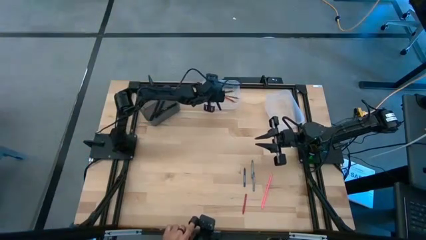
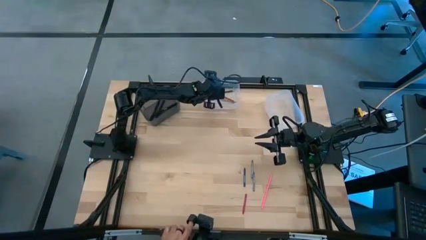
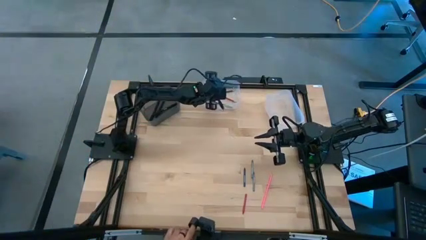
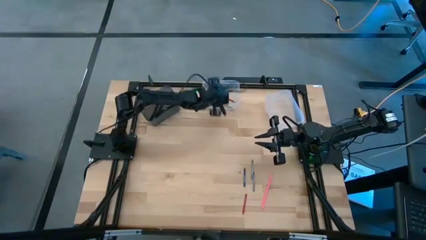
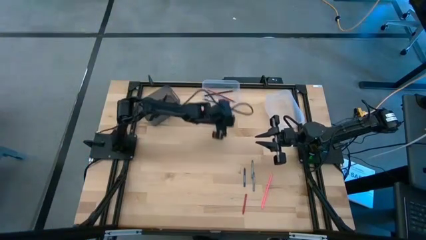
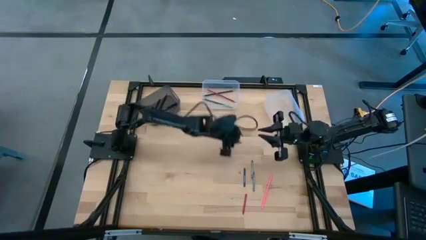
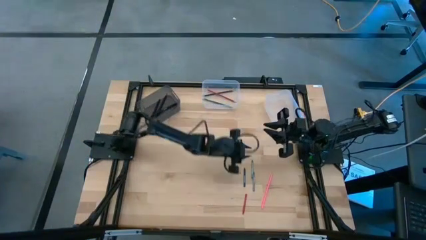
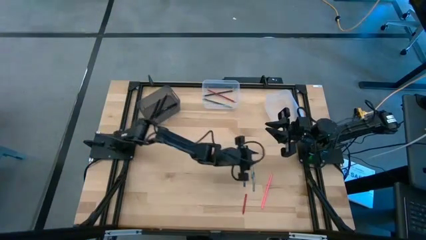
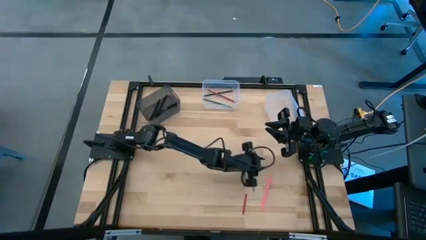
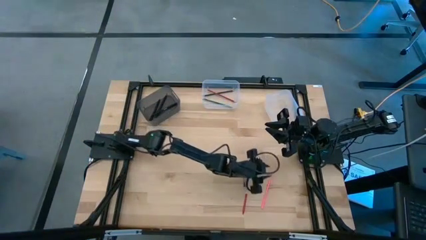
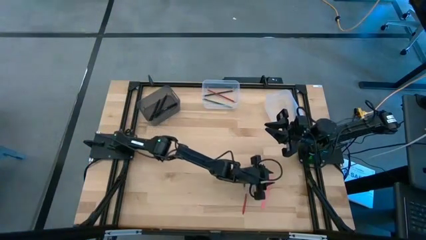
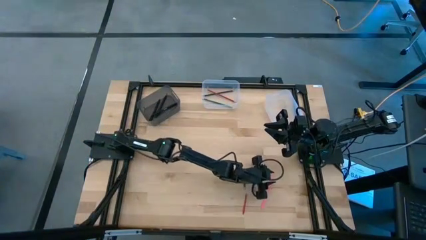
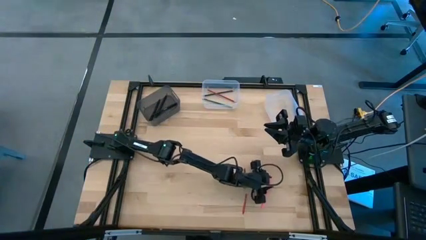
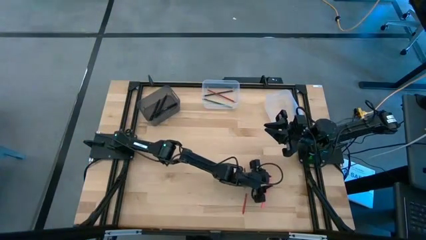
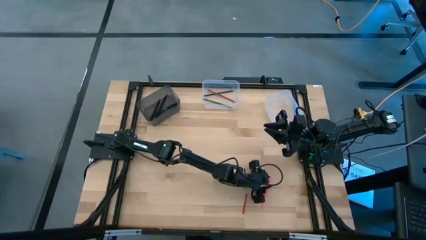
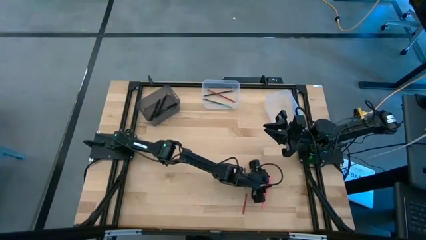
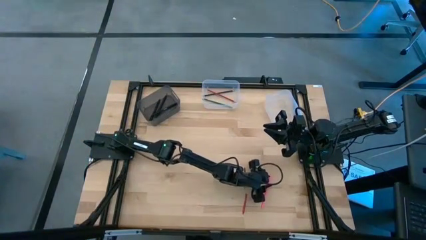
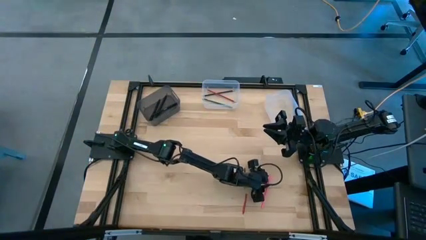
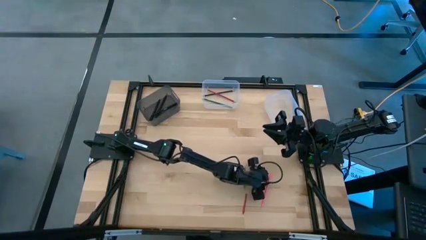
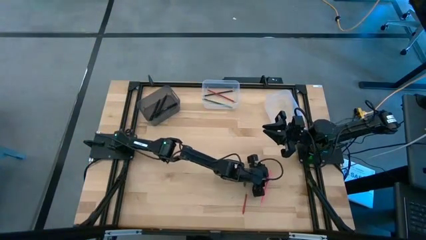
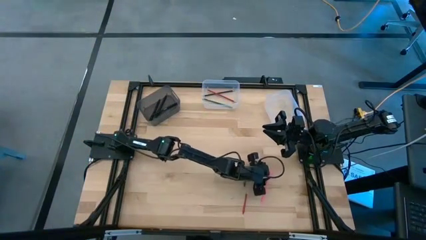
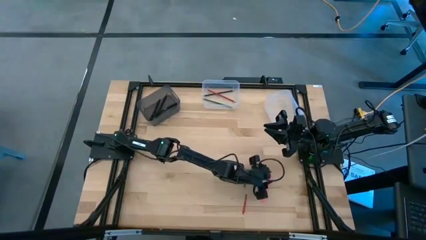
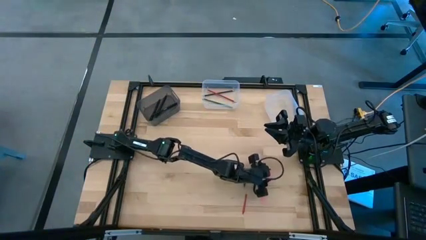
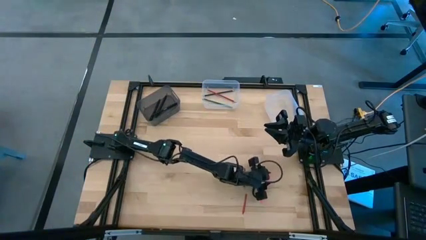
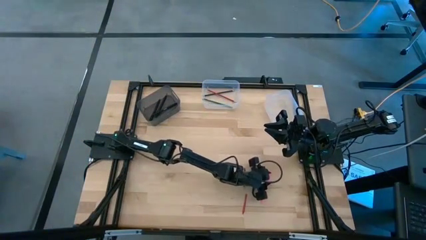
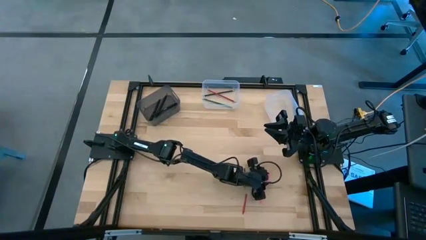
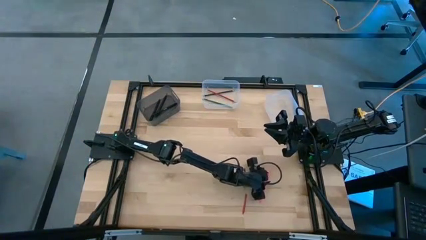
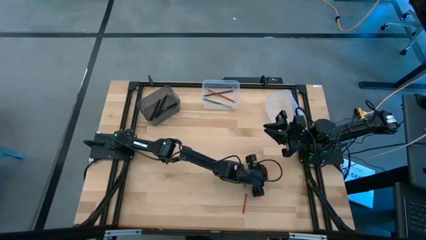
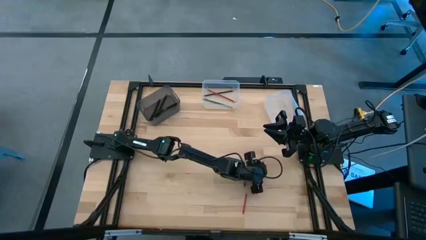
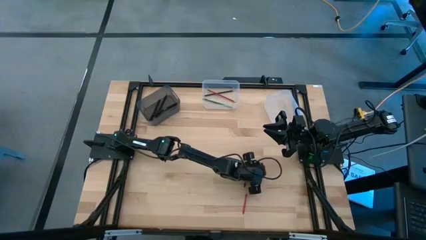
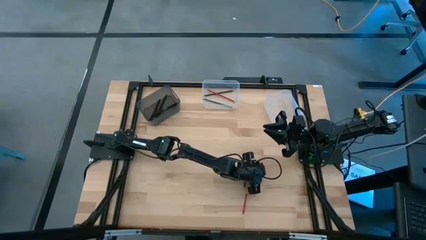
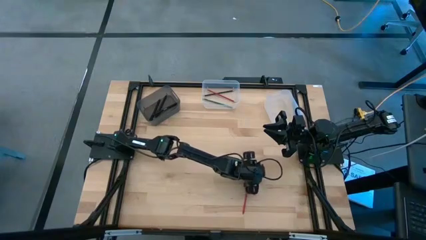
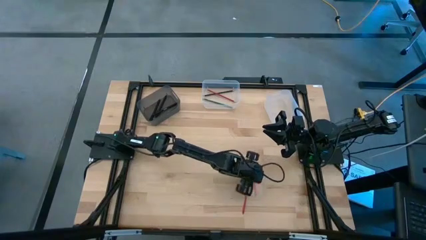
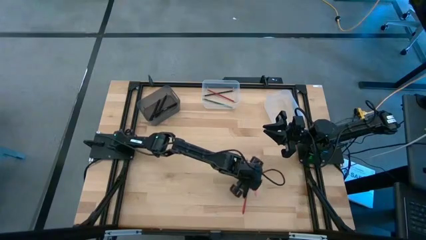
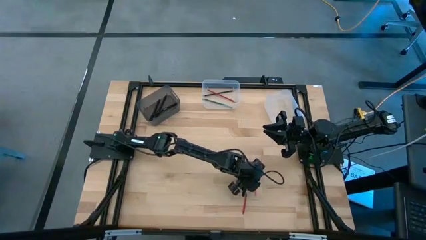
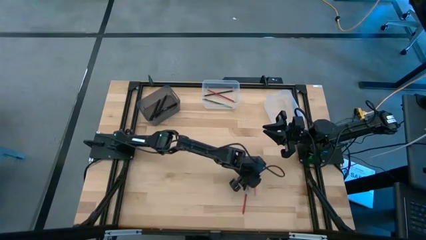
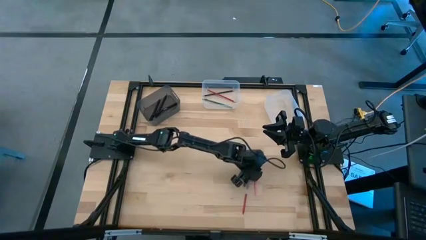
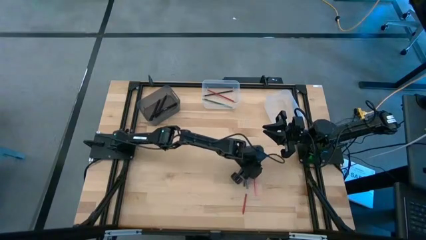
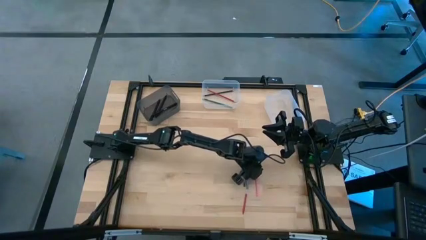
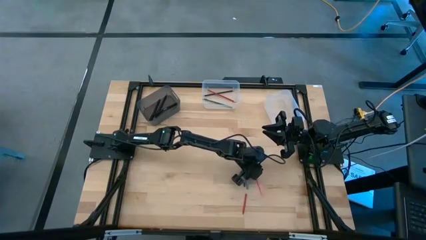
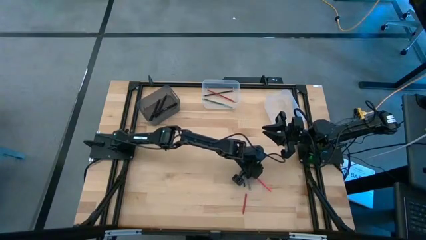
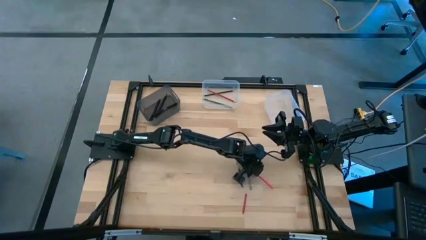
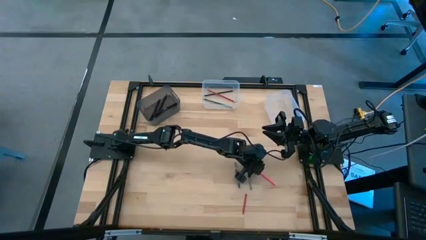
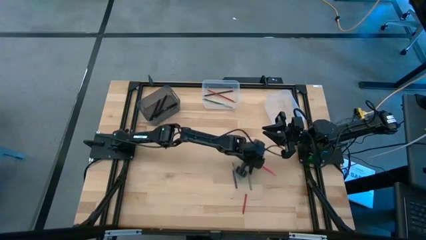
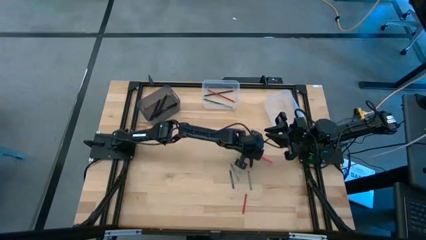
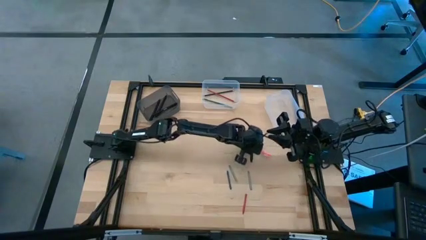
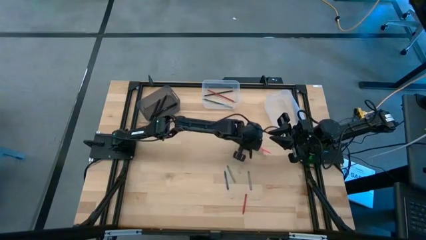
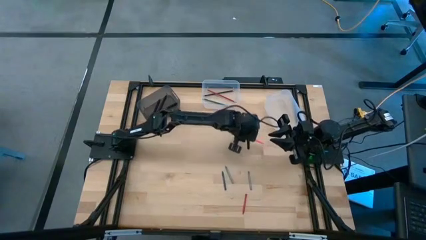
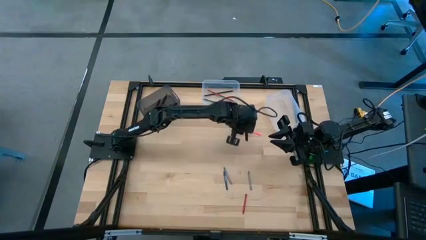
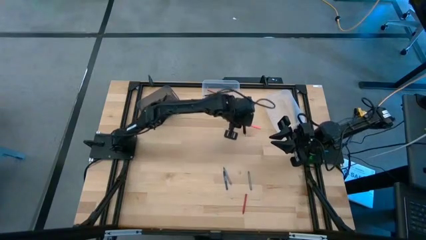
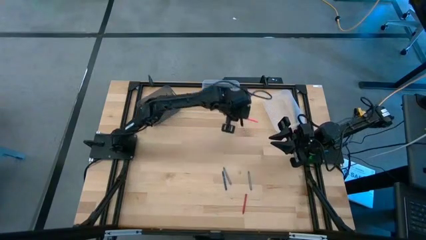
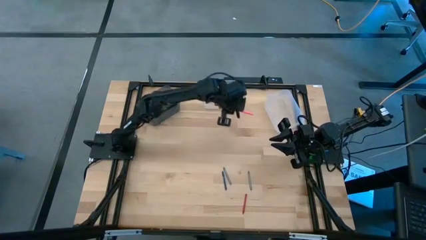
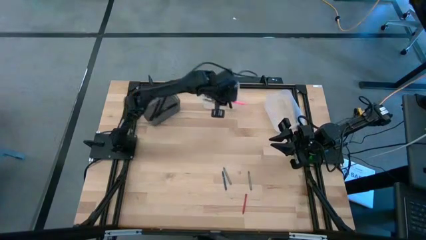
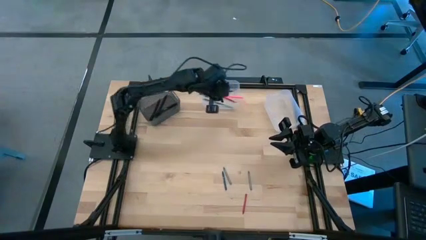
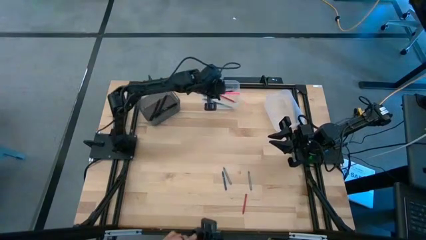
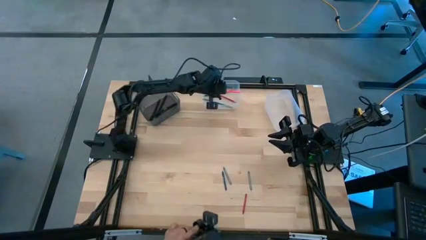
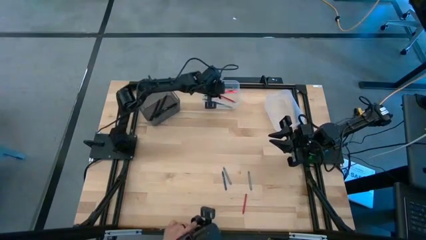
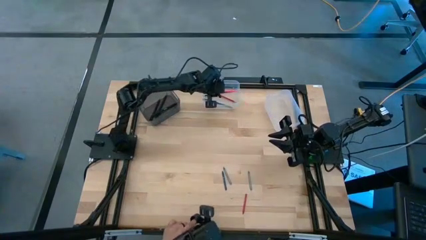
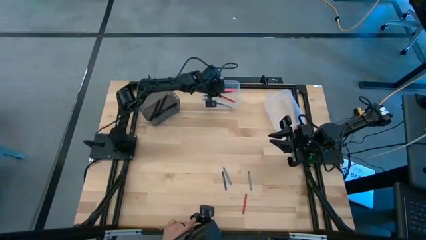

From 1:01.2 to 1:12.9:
Task: Sort crayons/erasers/pens/pencils in bins
Put the pink pencil into the left transparent bin

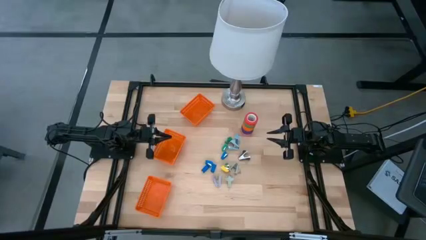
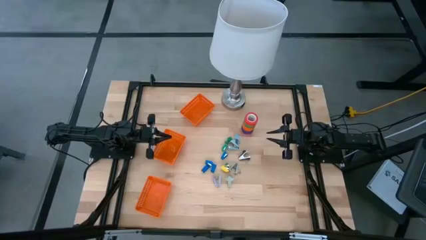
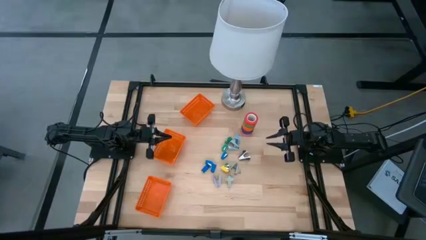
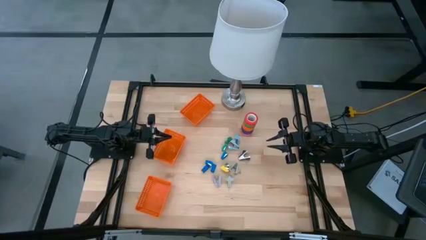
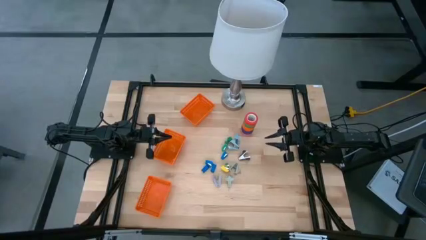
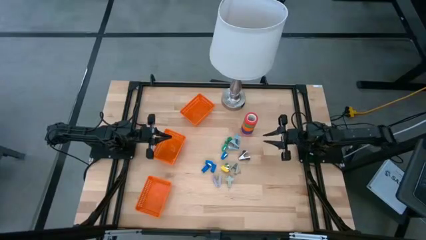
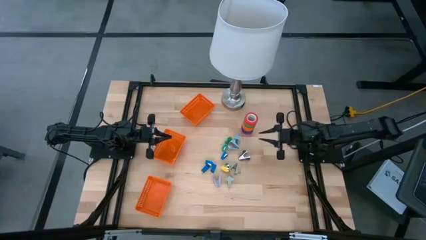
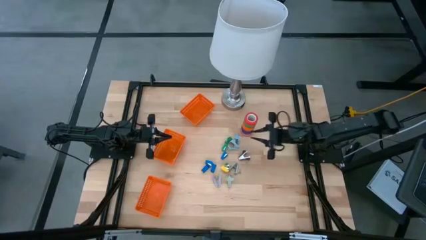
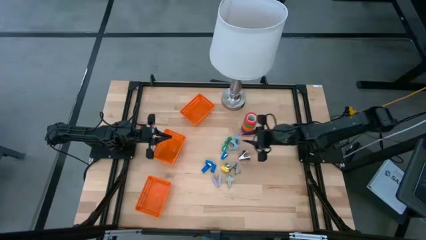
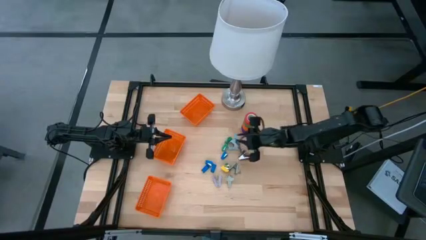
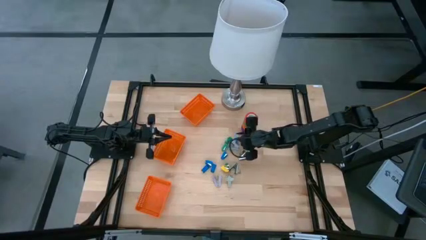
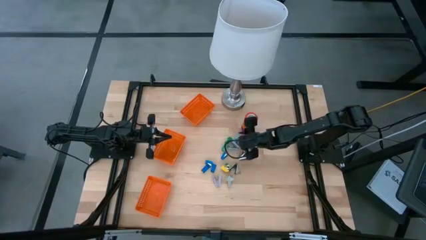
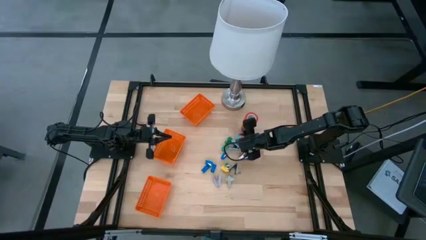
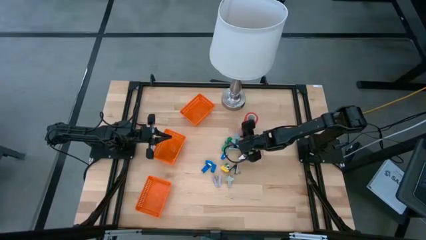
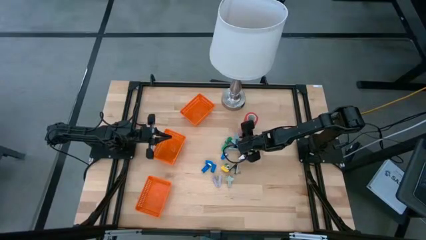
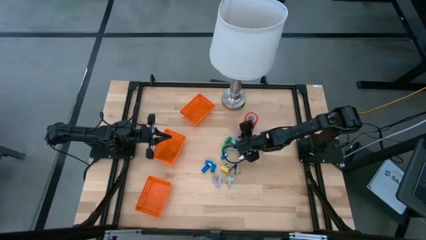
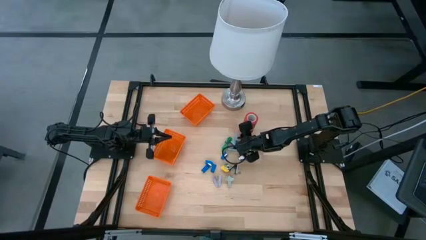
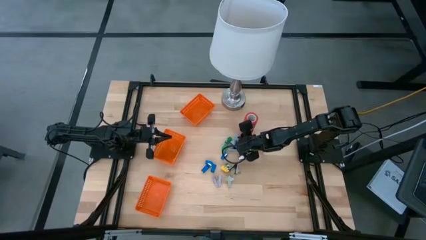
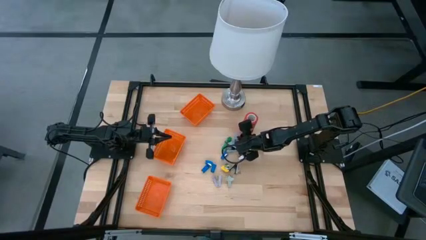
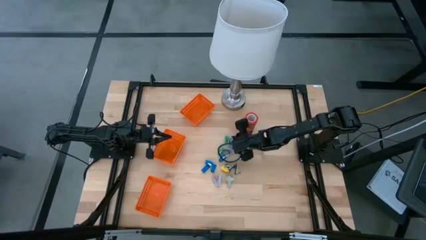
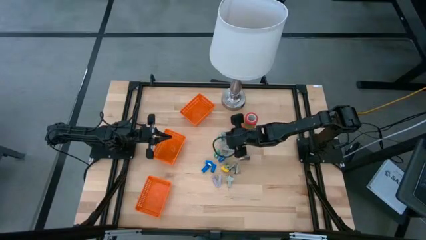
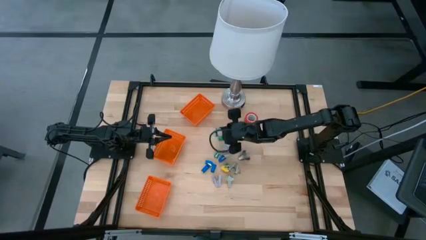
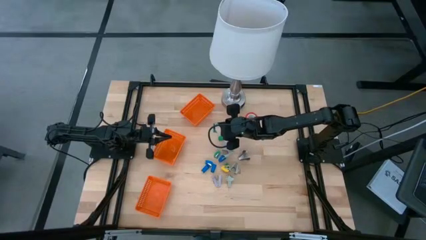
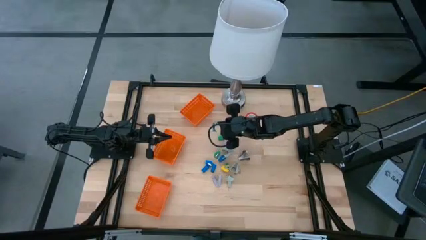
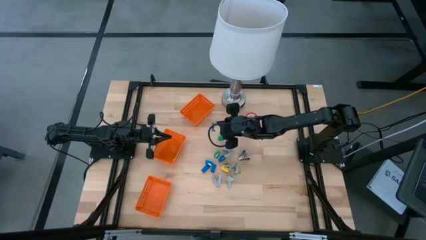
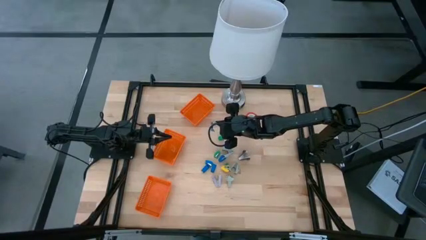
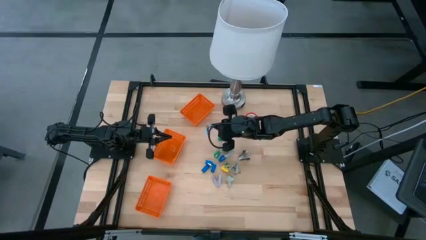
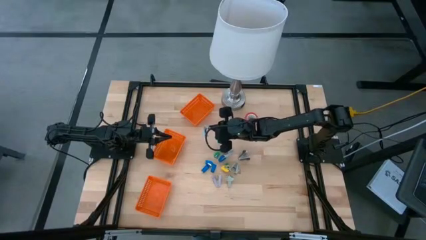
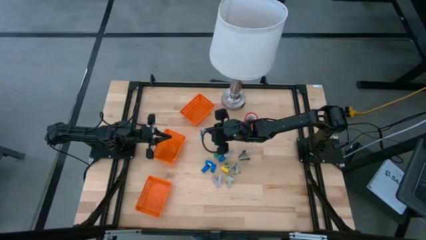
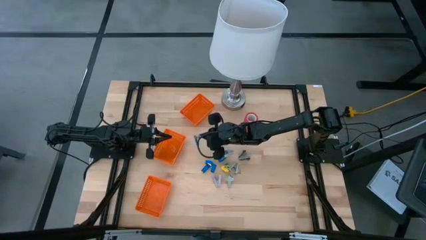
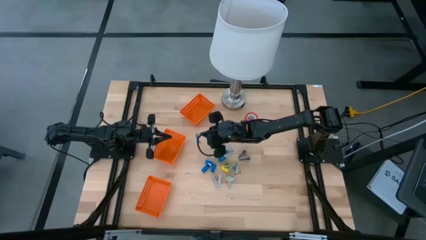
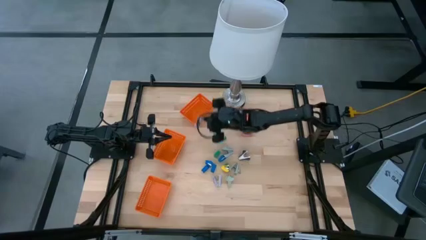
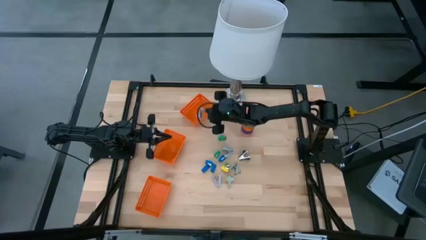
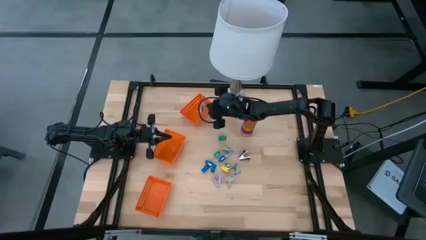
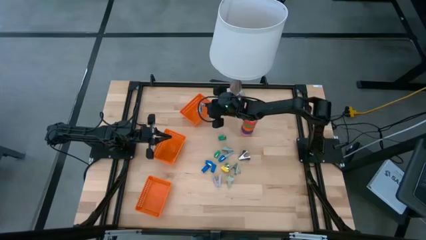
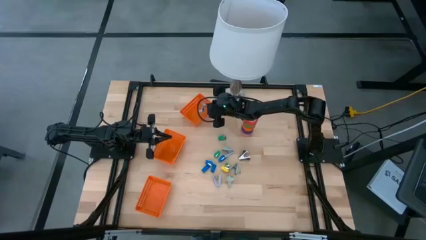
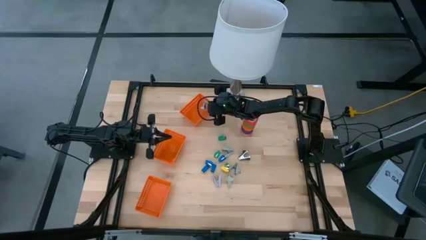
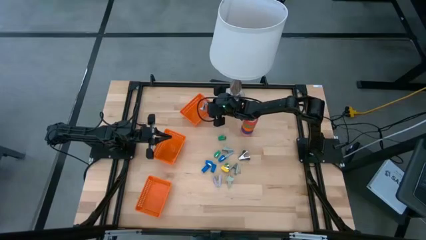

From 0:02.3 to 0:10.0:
Task: Pick and place Stapler, Stapler remover, tape
Put the light blue staple remover into the top orange bin
